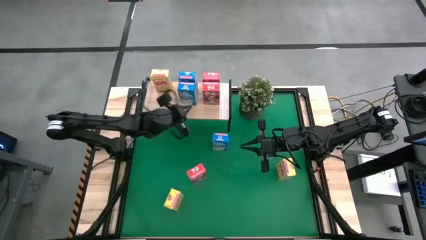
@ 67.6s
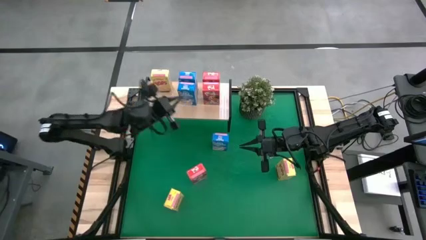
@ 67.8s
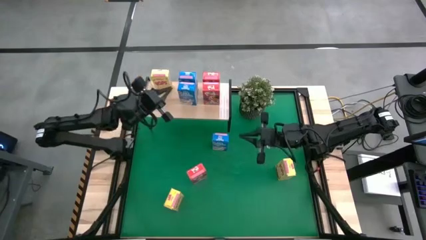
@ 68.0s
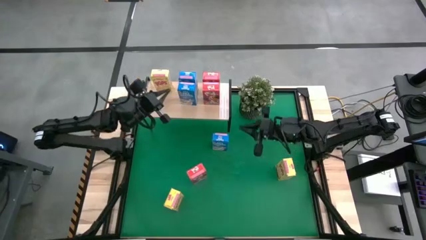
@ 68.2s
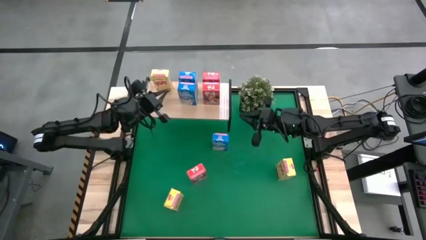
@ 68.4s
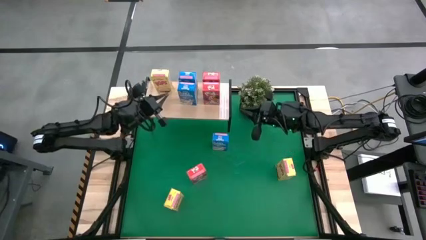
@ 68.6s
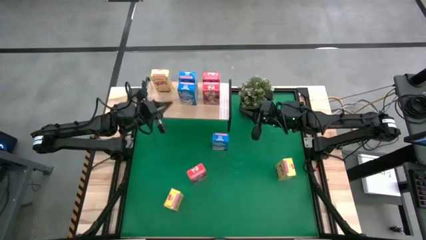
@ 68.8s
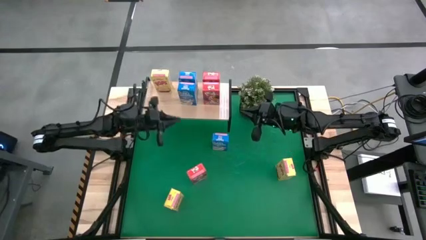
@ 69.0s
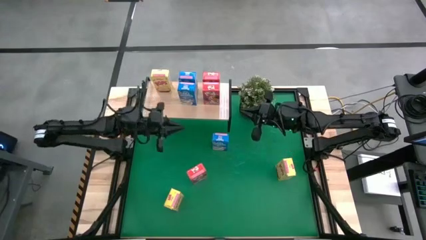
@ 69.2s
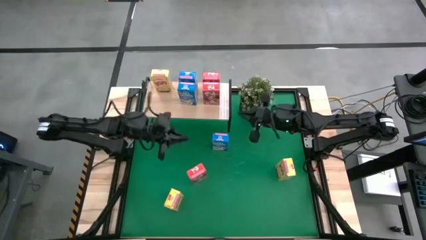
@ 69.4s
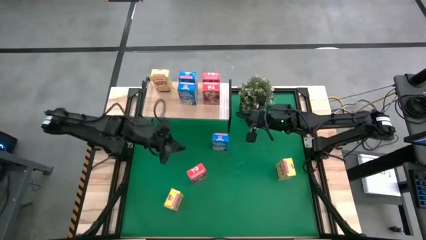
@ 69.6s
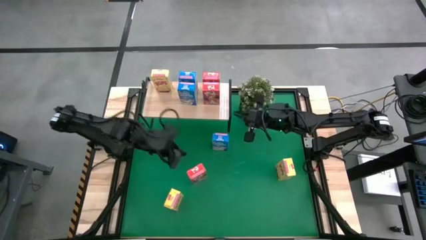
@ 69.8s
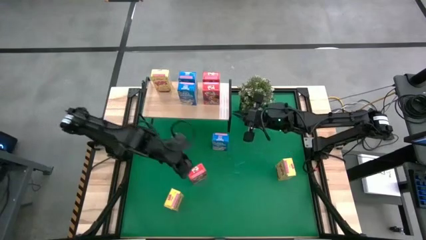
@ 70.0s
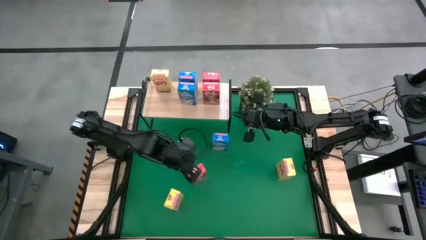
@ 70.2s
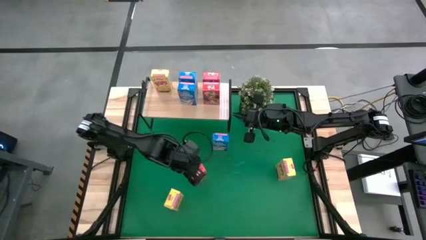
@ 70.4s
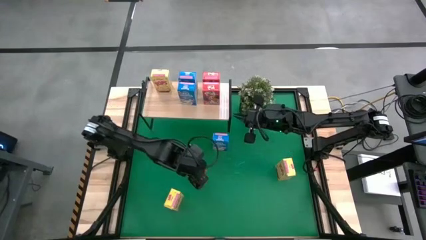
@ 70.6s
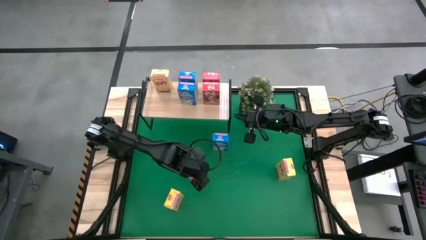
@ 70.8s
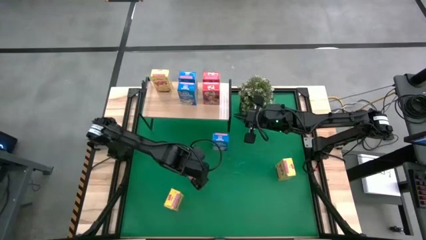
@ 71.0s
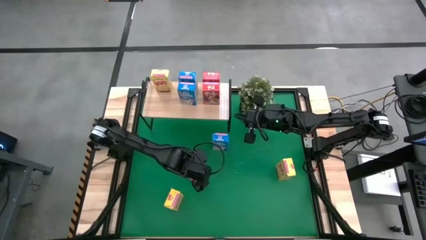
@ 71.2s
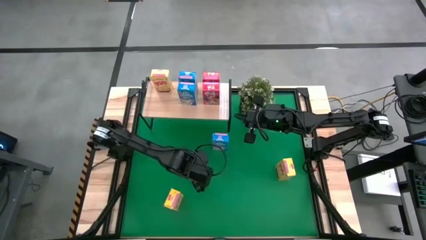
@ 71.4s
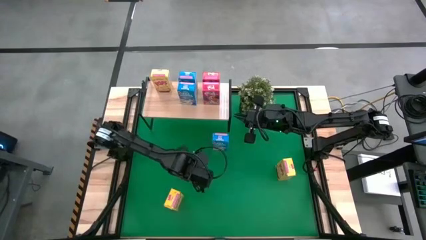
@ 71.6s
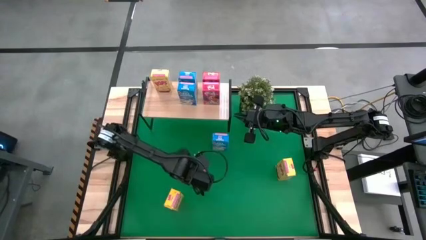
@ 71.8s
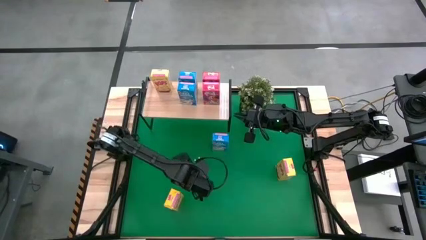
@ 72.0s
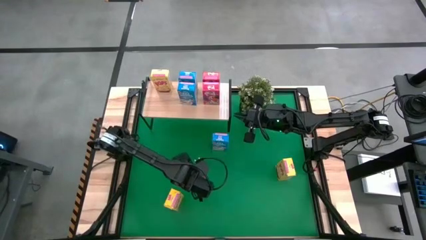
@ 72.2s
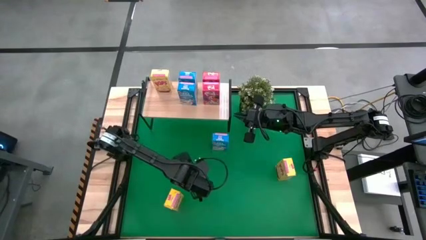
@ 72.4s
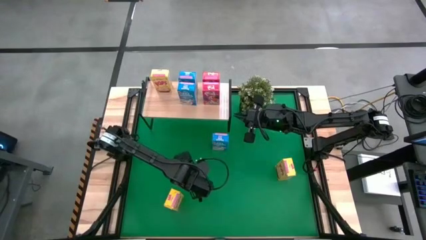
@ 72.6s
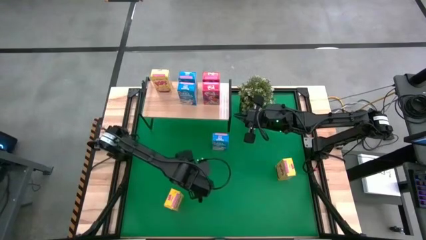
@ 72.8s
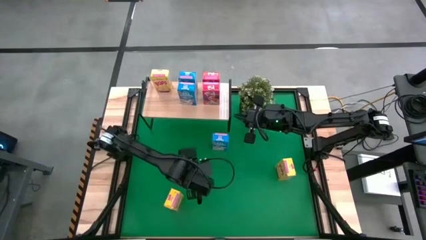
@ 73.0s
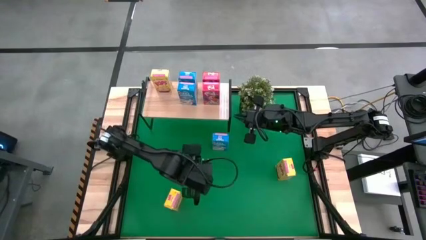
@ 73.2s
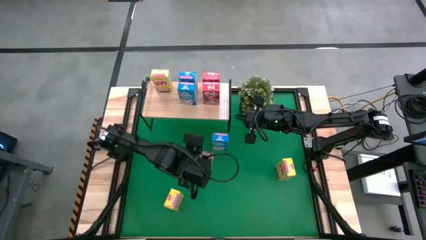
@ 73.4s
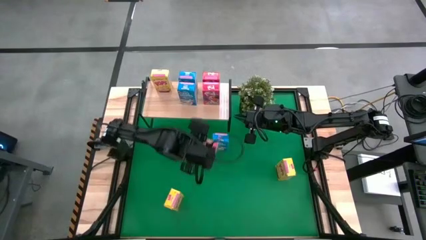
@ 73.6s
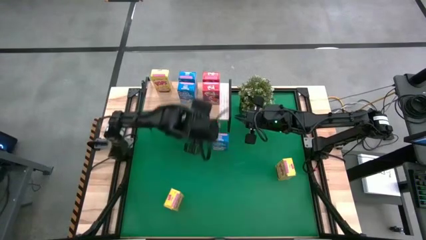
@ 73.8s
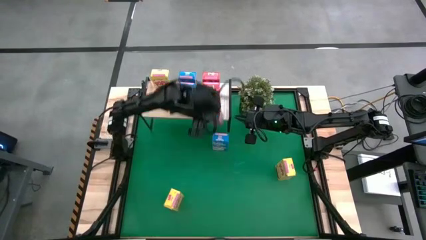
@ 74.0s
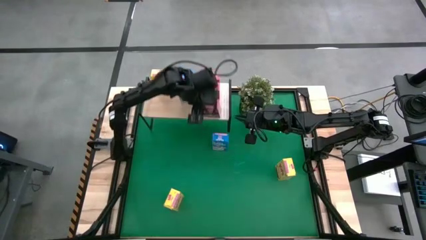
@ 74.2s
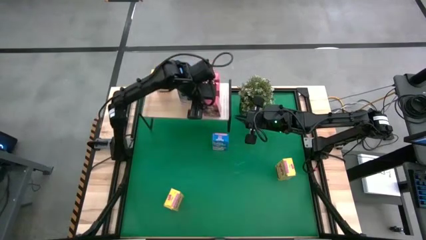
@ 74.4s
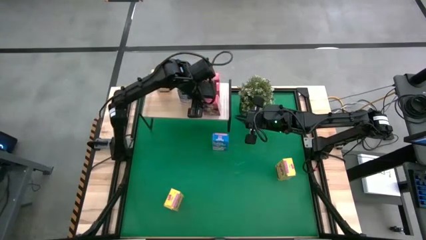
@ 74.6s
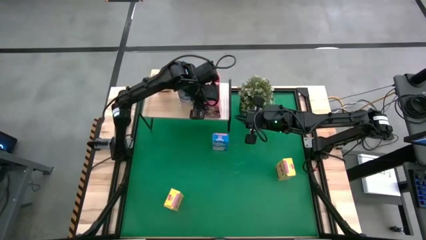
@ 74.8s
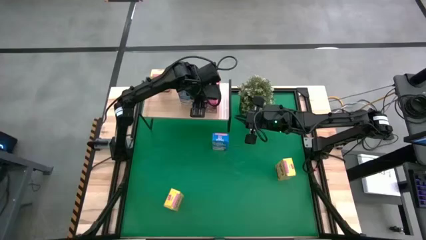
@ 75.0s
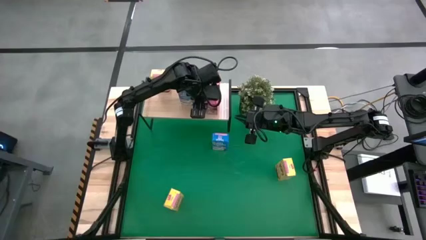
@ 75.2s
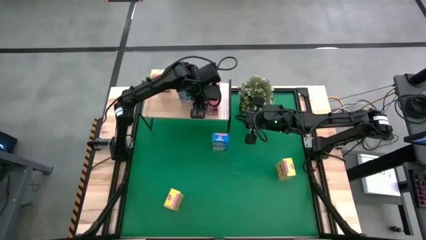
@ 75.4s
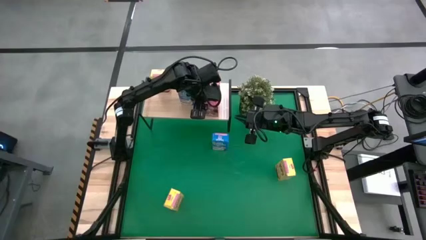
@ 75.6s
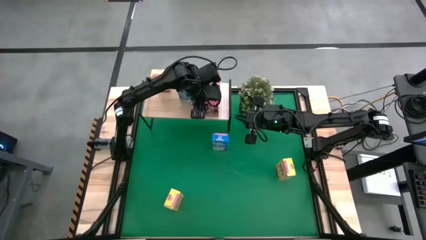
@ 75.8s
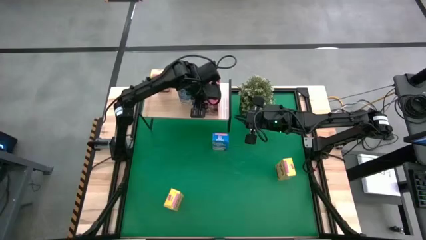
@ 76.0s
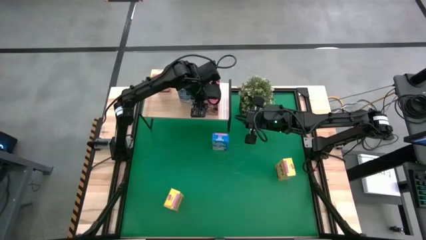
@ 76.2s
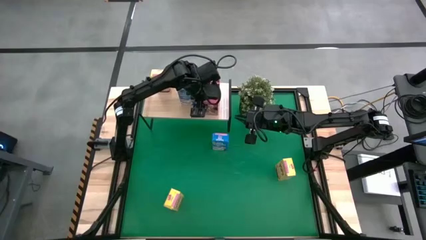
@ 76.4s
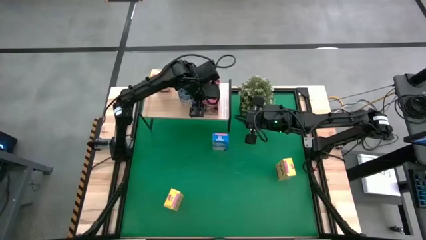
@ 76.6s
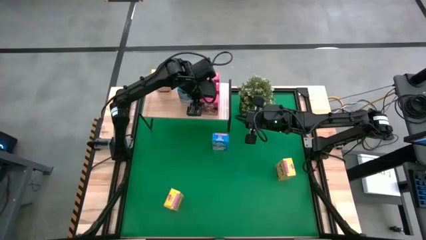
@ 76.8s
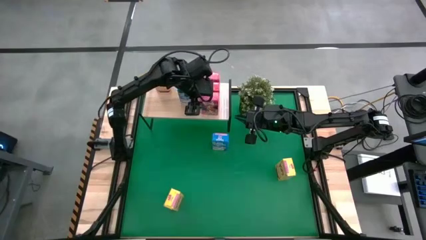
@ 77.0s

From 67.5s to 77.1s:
Task: Stack cereal on shelf
Put the red cereal box on the shelf aligned with the other red cereal boxes

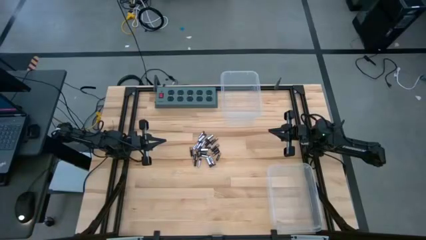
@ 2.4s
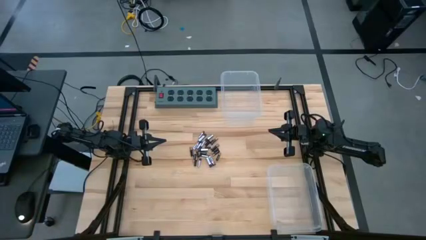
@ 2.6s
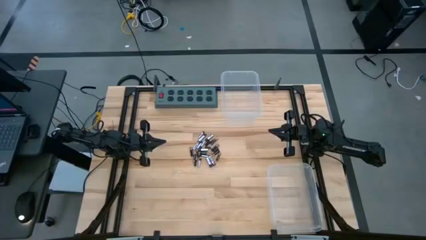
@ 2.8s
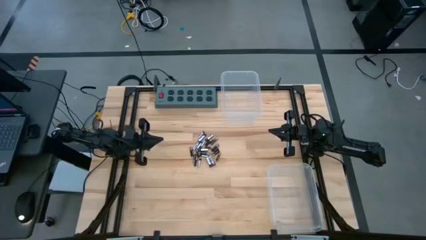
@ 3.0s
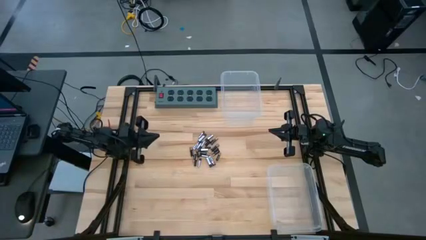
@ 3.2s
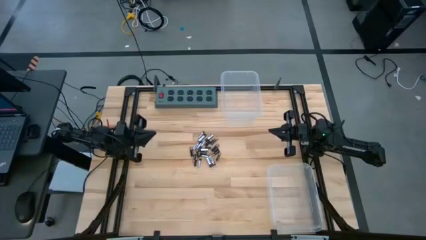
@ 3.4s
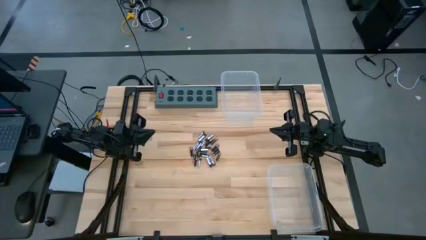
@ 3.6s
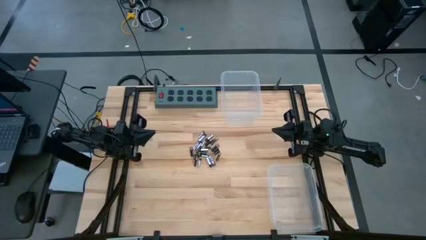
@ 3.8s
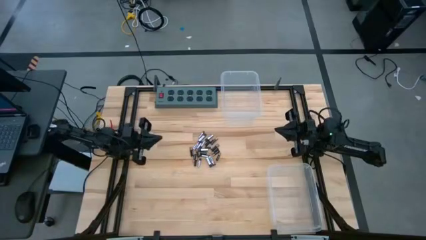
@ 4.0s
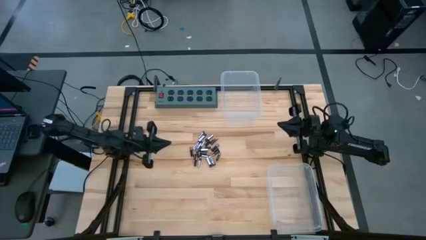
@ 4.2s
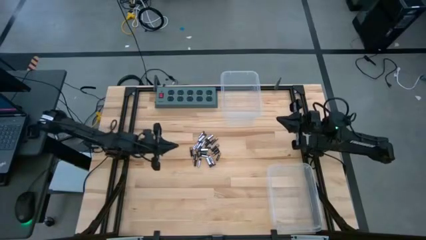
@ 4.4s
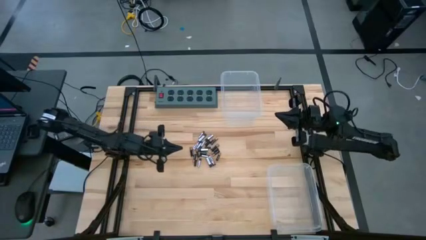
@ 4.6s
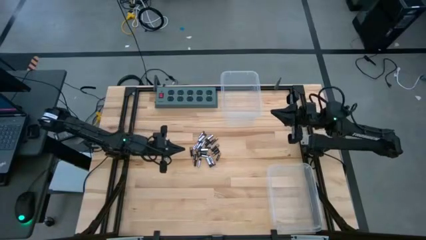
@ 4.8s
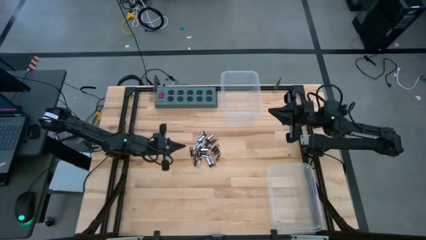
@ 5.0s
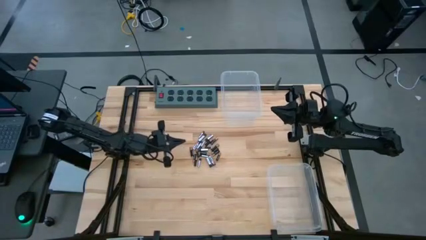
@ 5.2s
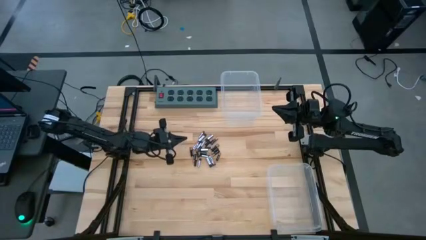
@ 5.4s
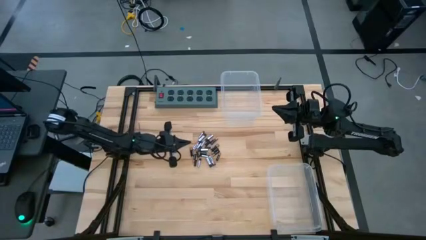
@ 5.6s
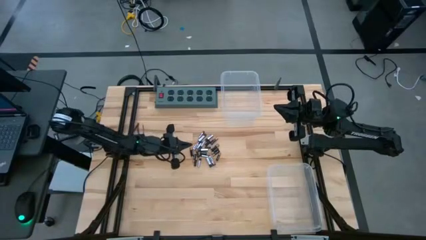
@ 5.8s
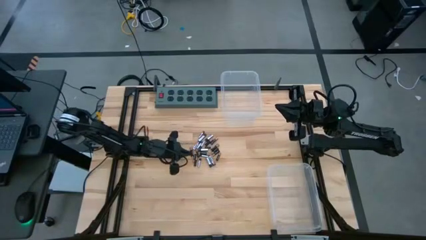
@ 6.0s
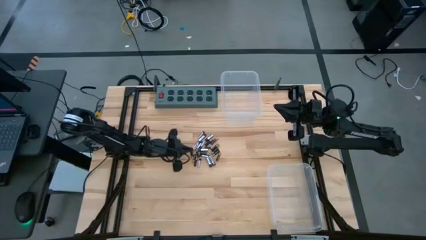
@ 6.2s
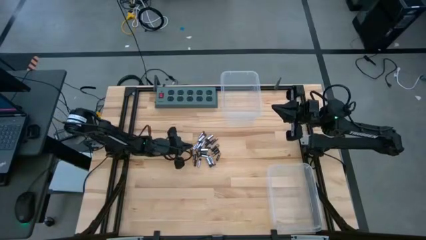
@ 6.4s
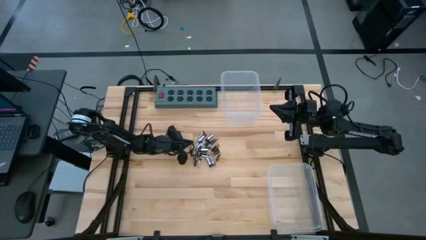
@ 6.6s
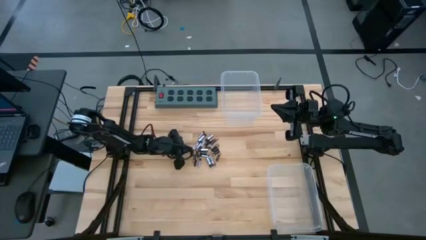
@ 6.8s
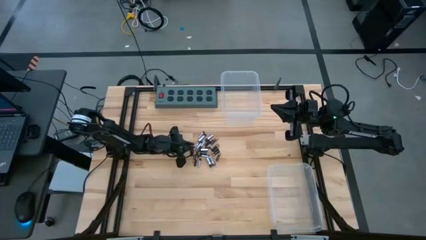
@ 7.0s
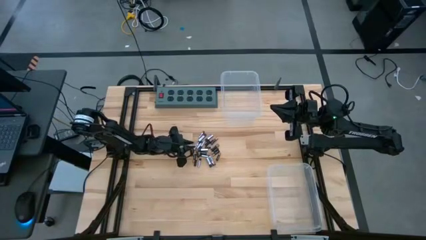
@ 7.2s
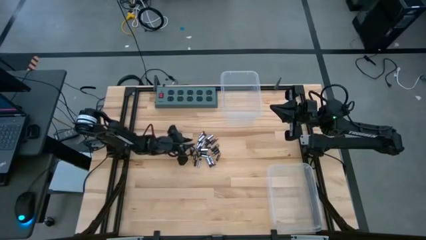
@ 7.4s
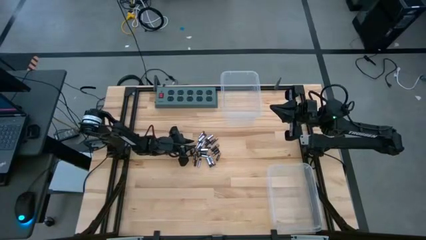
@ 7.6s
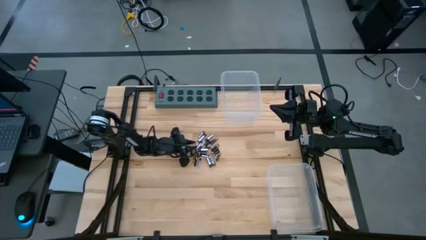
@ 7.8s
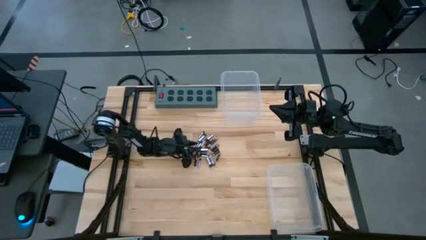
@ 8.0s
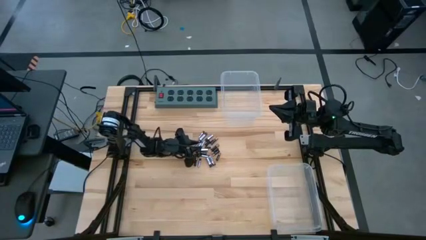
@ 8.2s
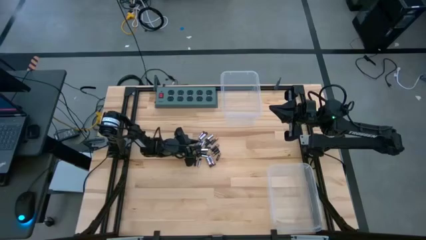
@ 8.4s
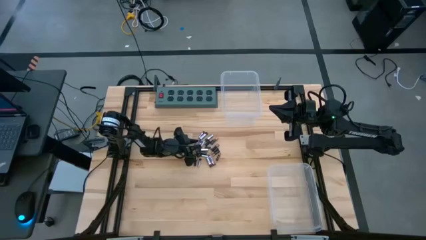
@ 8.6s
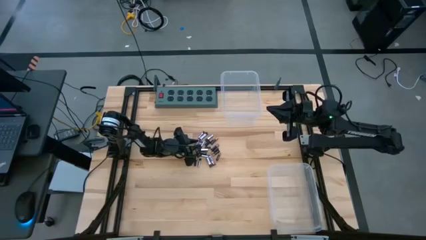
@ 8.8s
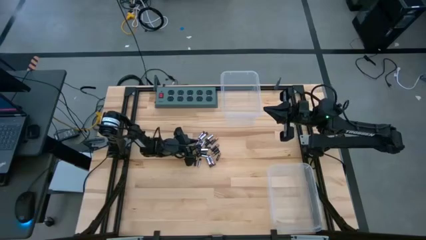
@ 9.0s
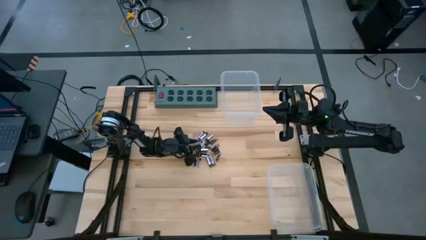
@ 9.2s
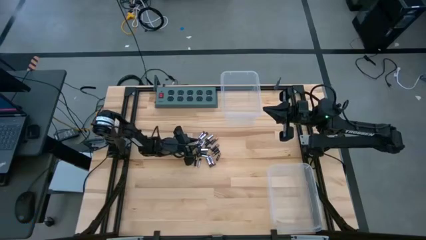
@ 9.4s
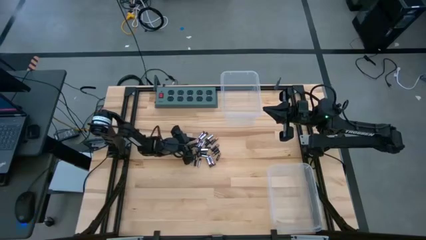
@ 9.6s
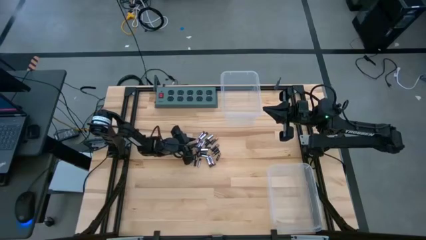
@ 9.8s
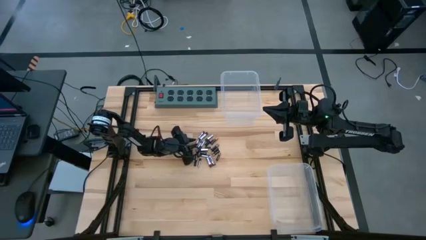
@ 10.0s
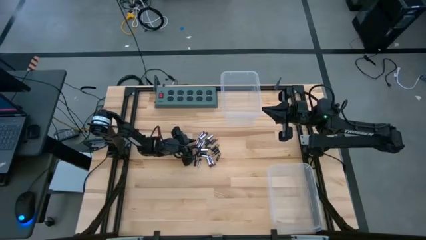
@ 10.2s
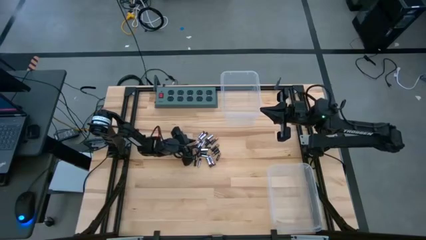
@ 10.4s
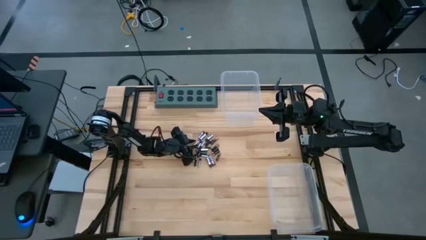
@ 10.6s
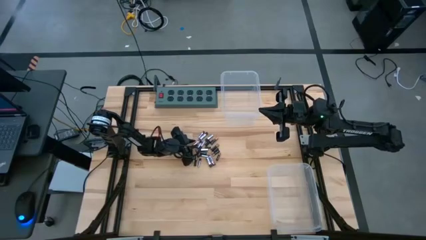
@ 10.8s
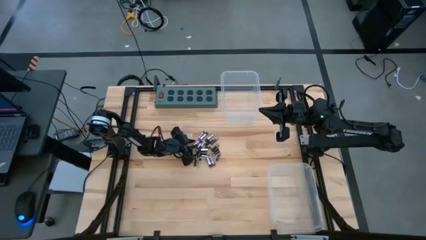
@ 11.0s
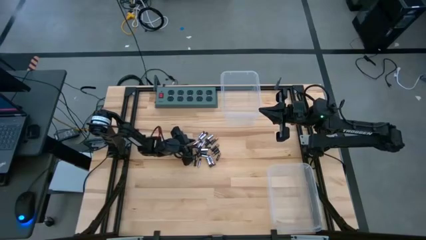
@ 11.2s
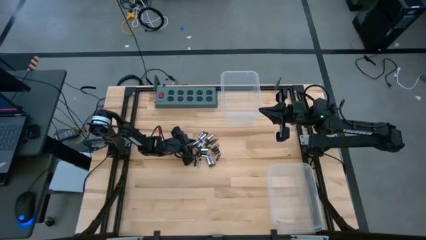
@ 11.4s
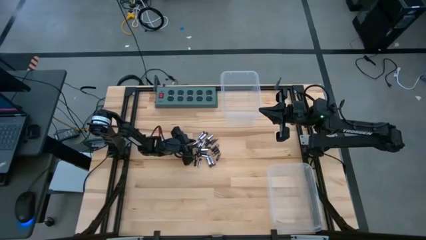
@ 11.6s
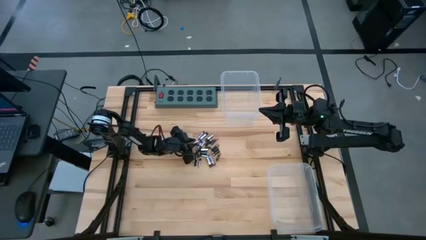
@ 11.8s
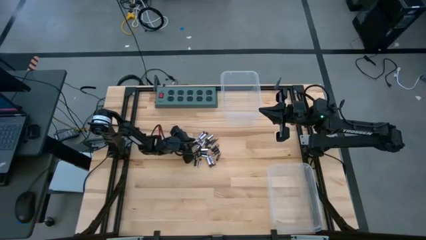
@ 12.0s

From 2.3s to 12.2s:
Task: Sort batteries
Put the silver battery into the top transparent bin
